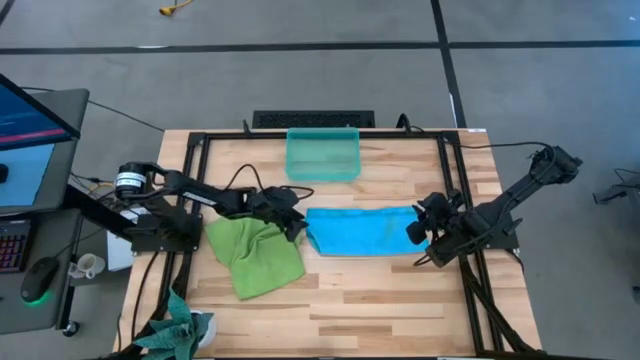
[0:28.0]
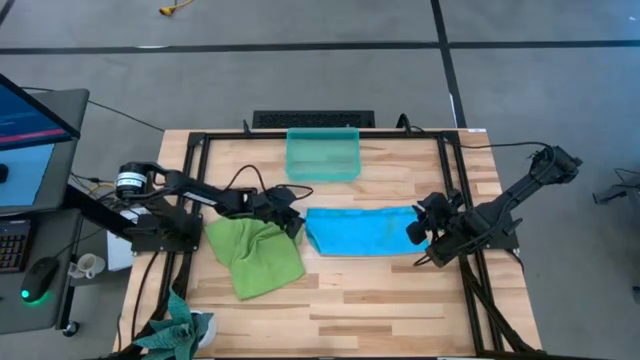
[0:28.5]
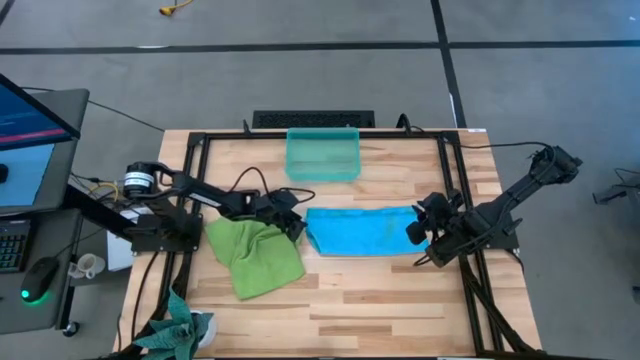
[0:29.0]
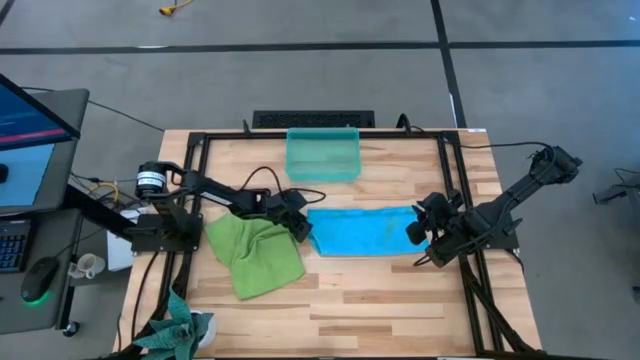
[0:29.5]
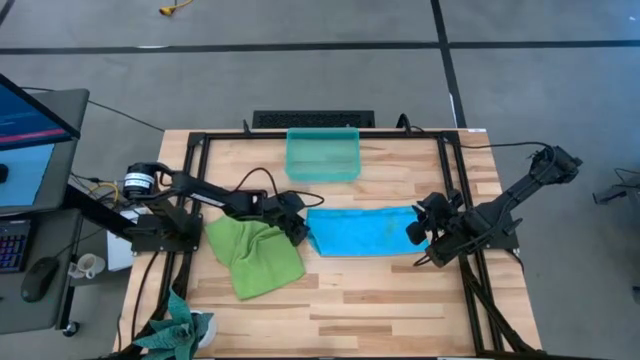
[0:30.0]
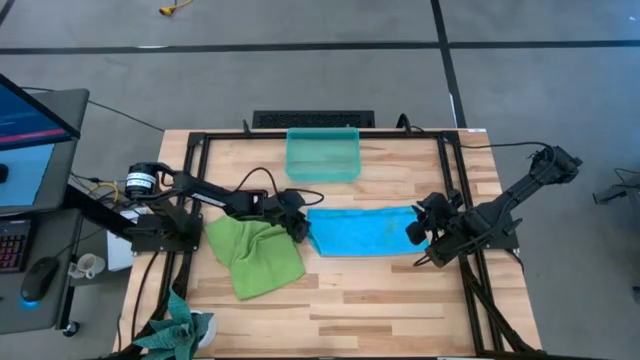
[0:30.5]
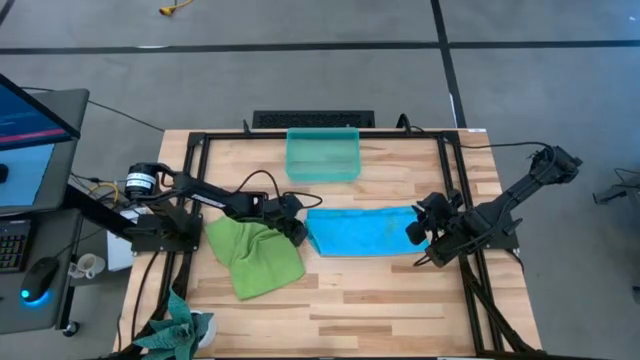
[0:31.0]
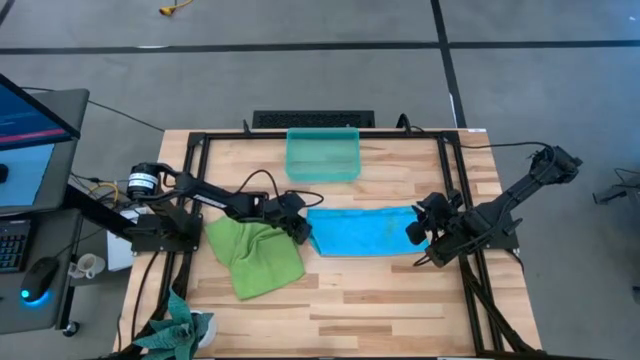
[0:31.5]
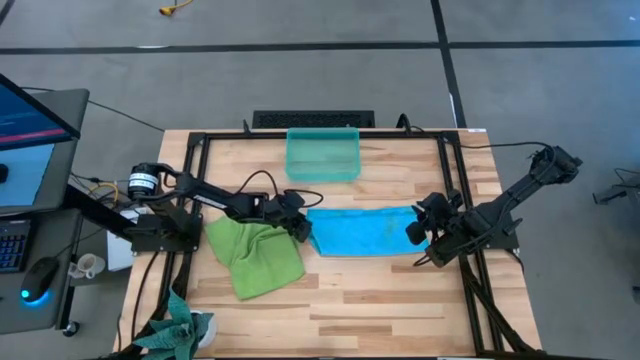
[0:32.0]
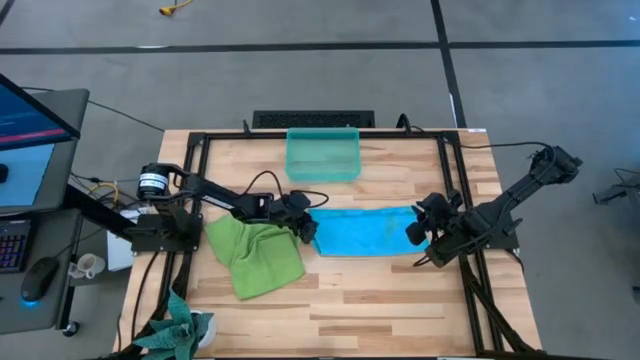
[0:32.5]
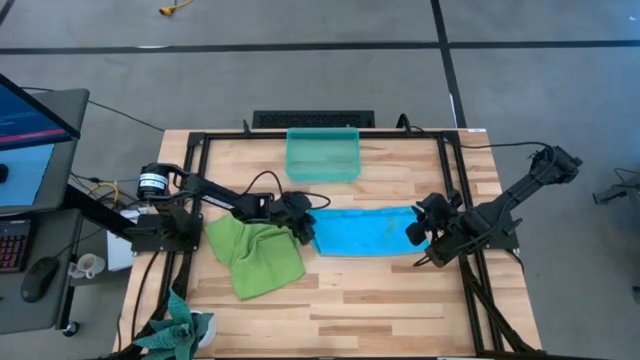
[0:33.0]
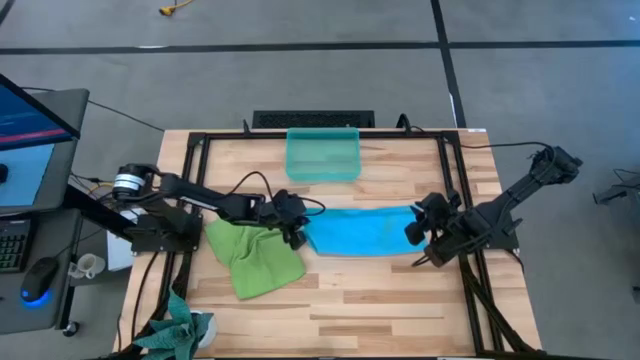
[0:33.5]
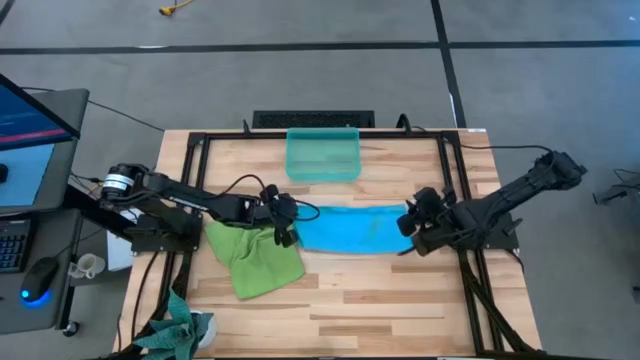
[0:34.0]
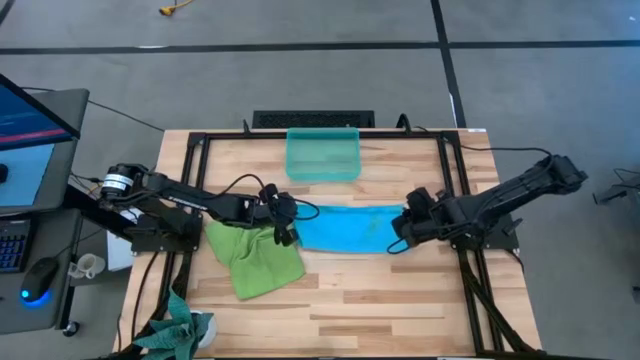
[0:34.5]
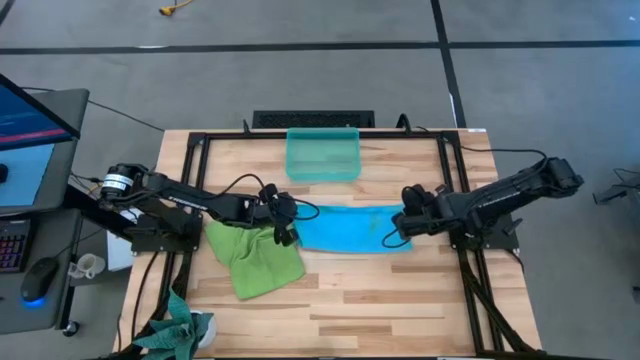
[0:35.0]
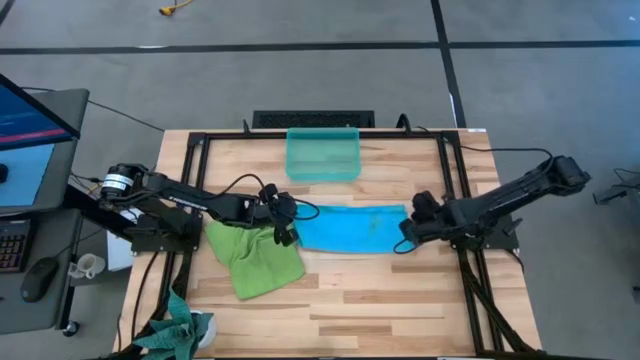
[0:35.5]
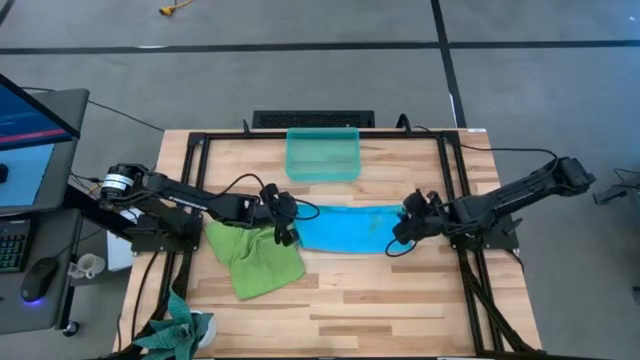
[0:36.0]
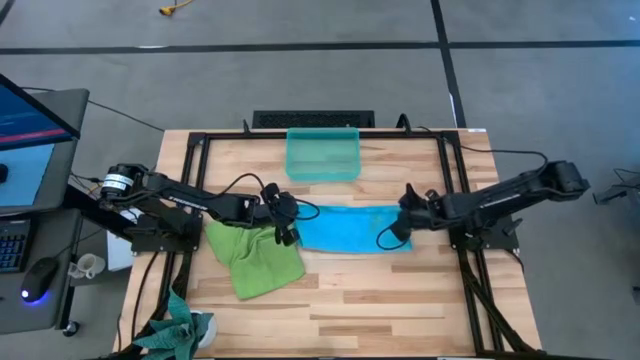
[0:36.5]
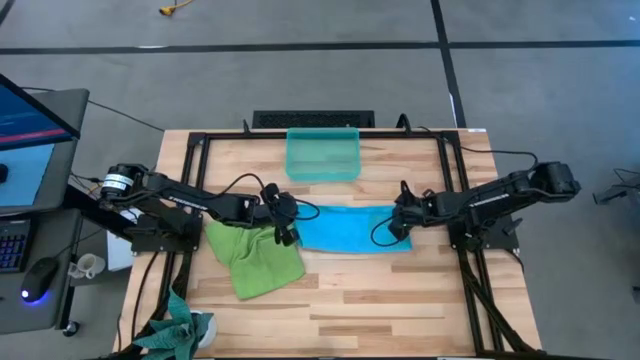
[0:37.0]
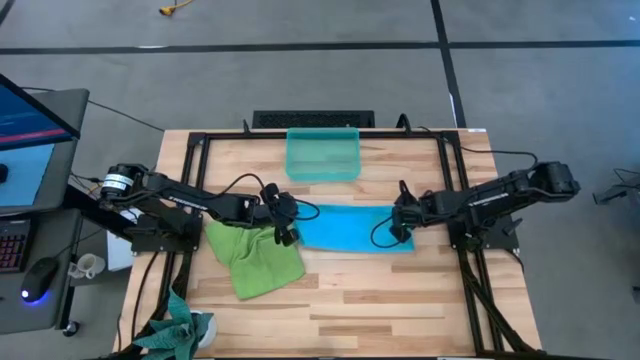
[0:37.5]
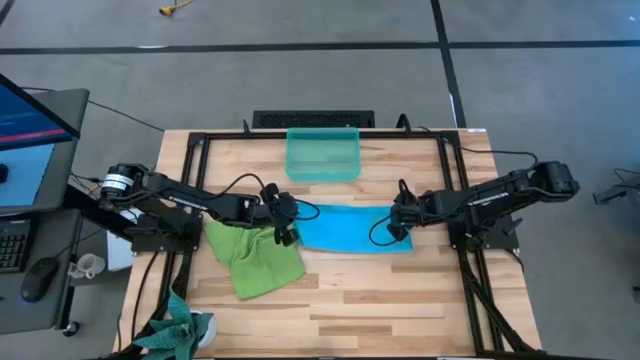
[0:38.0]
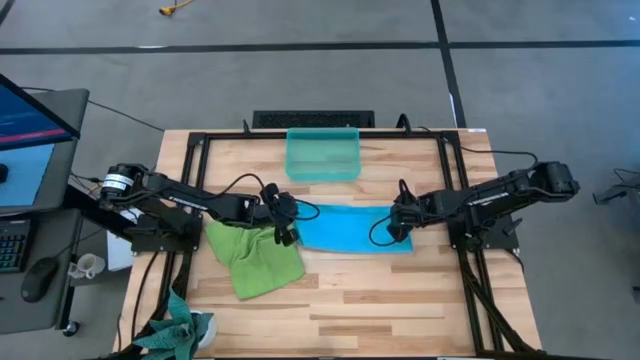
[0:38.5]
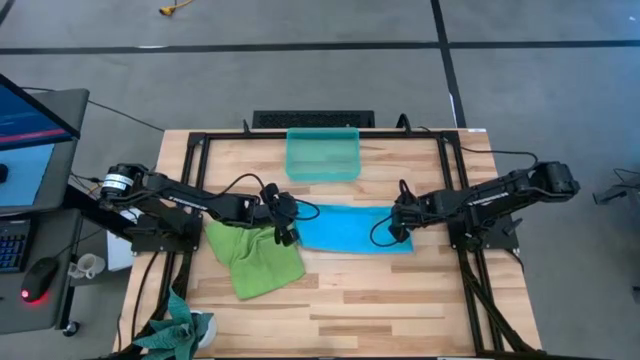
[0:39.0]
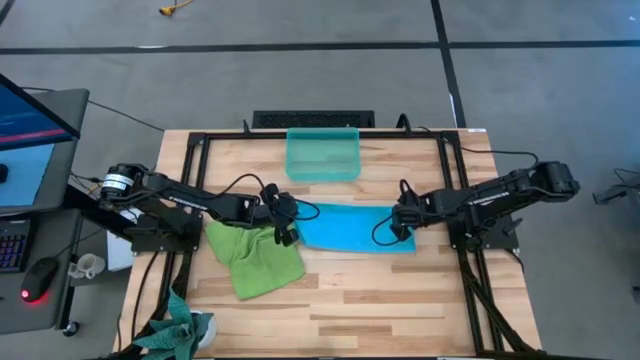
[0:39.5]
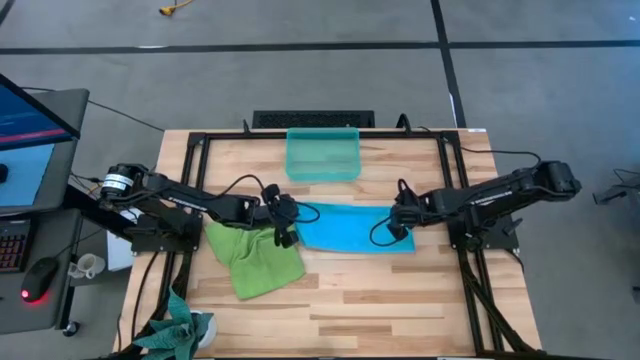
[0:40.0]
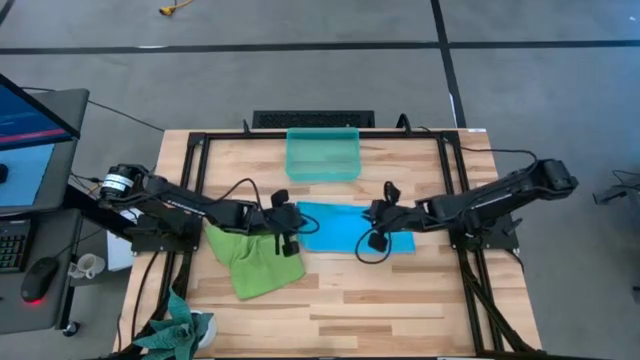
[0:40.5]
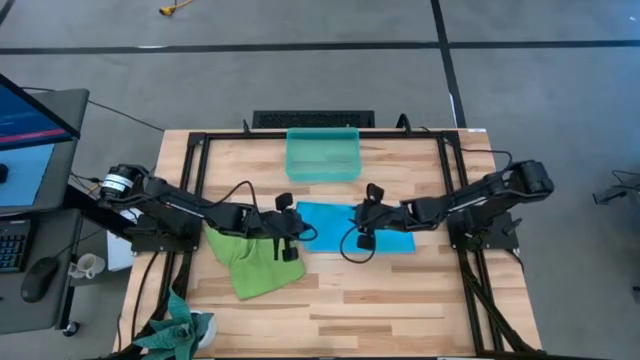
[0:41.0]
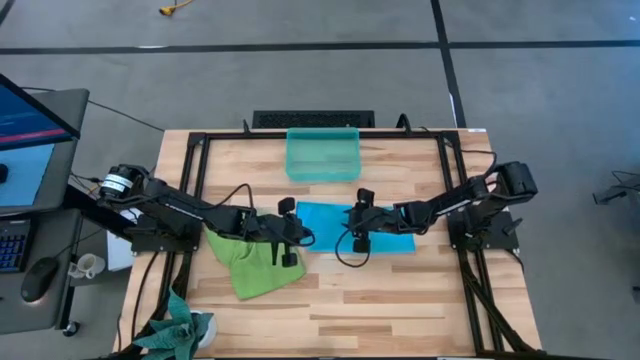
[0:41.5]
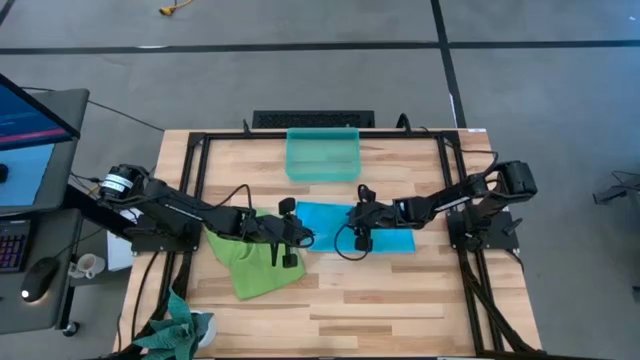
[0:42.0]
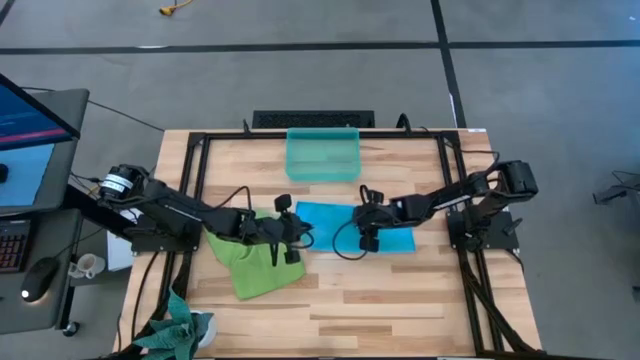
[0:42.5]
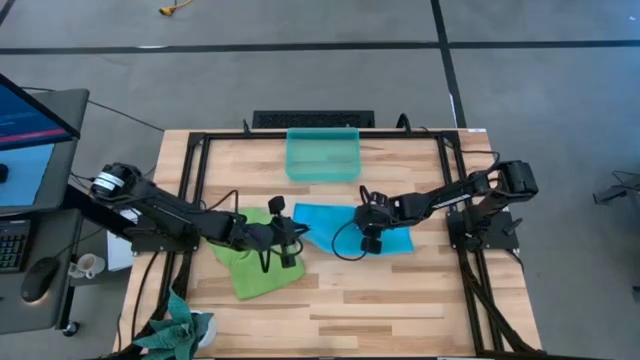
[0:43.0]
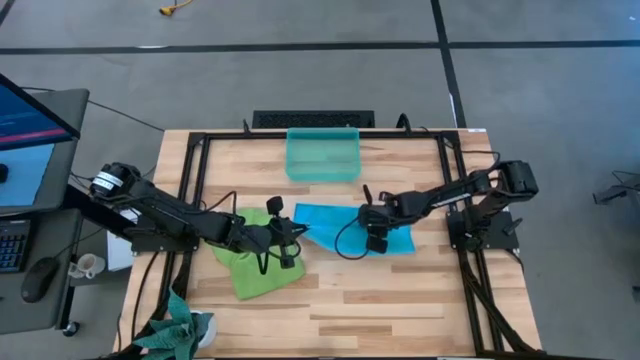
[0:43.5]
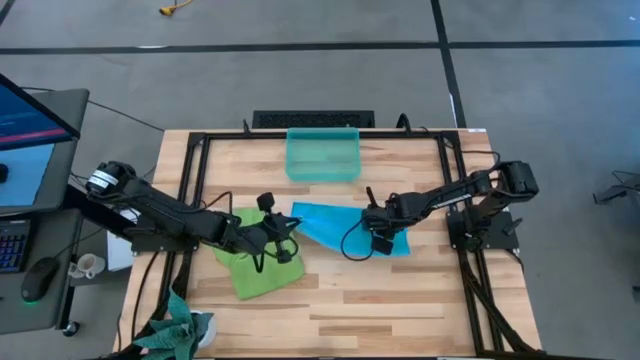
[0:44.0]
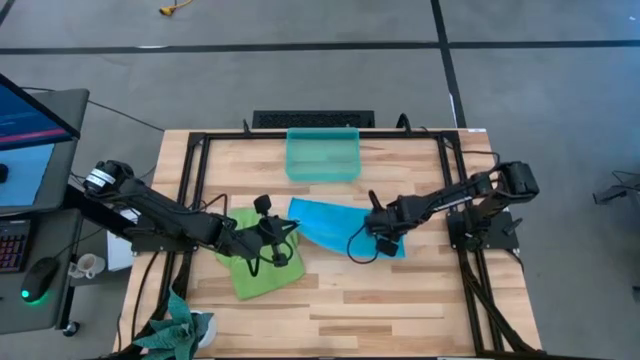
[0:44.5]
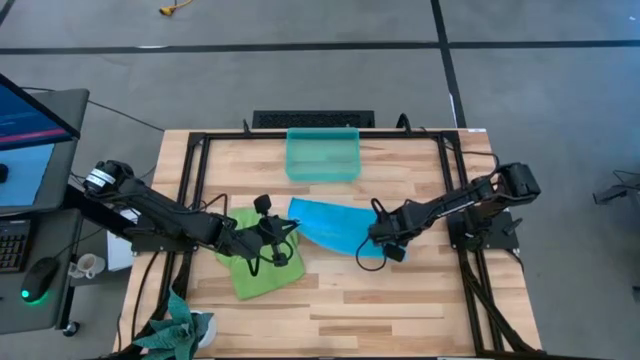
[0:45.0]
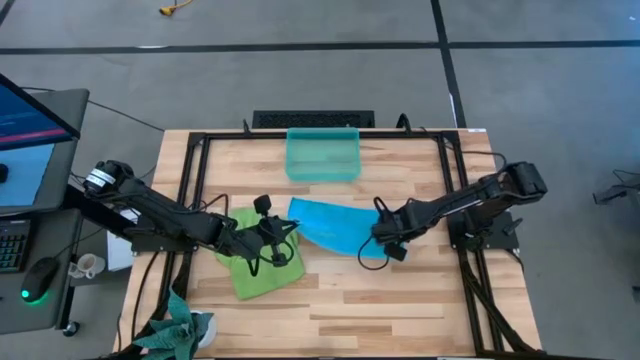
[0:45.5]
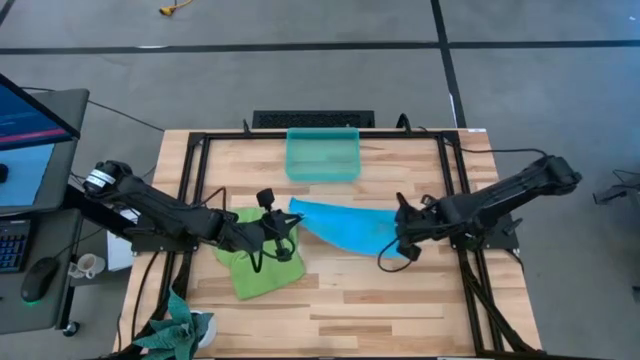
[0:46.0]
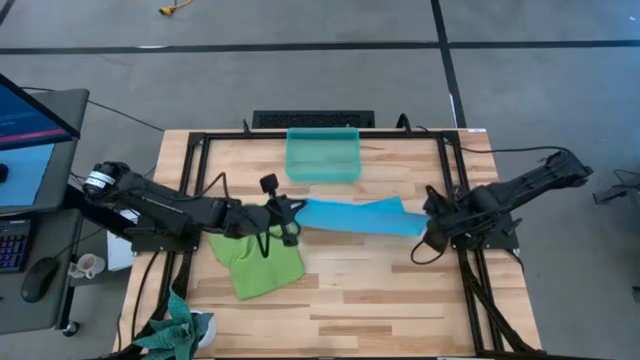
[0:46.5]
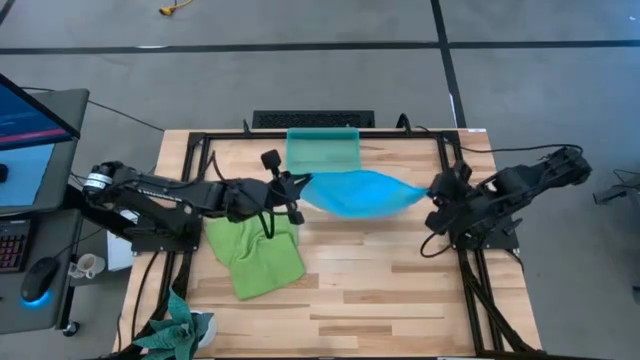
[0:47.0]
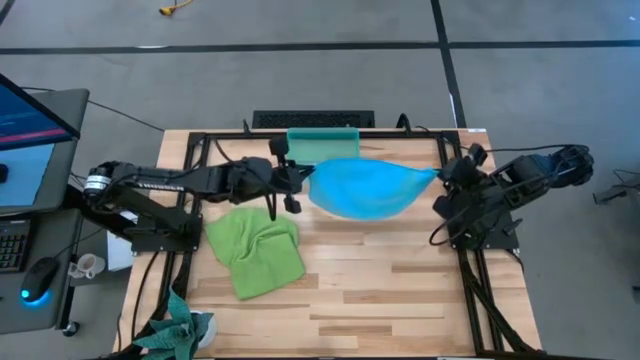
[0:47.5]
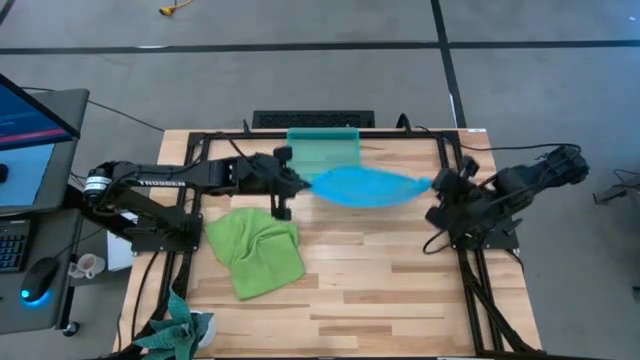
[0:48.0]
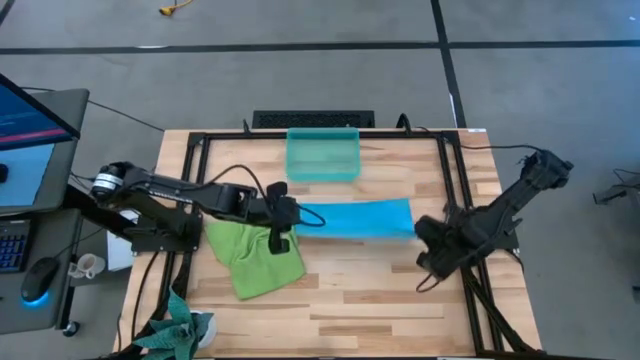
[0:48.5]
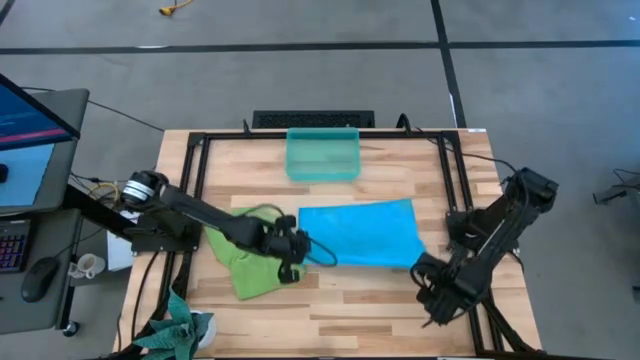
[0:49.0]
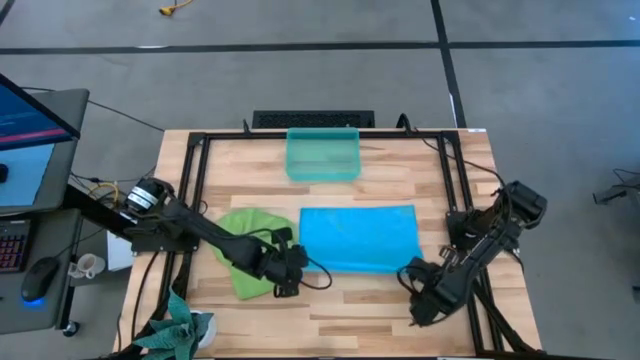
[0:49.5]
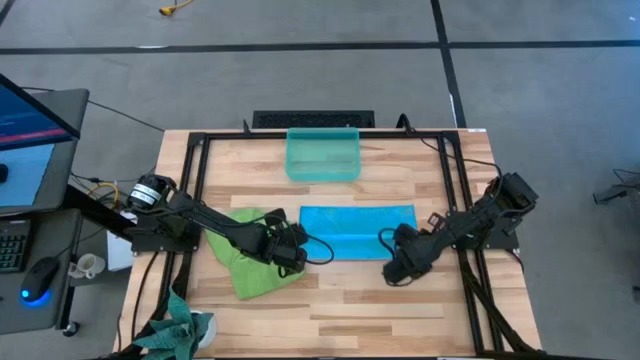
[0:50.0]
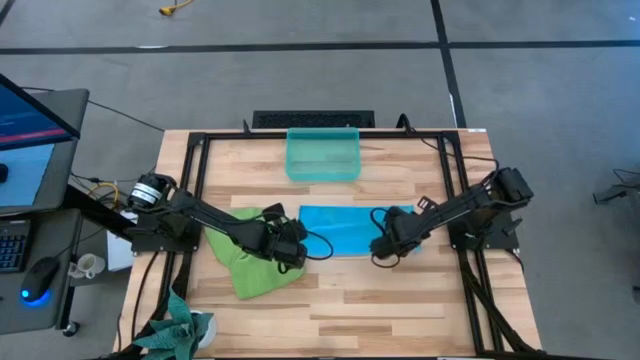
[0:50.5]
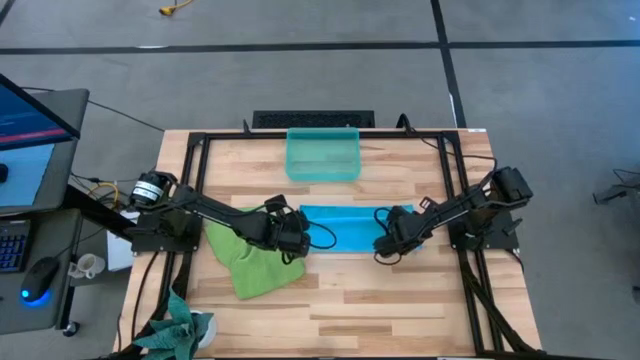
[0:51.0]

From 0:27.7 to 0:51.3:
Task: Roll microfiber towels into tight, uniform cylinder then place into a basket
Fold the blue microfiber cloth
